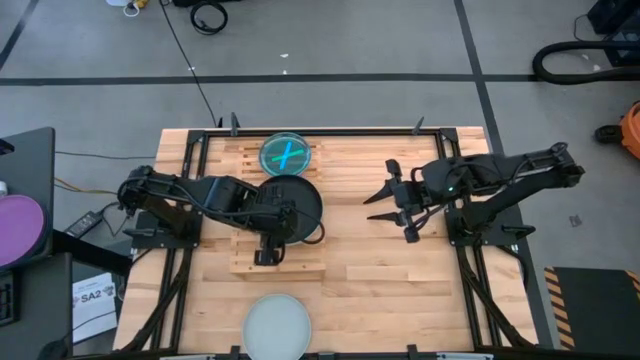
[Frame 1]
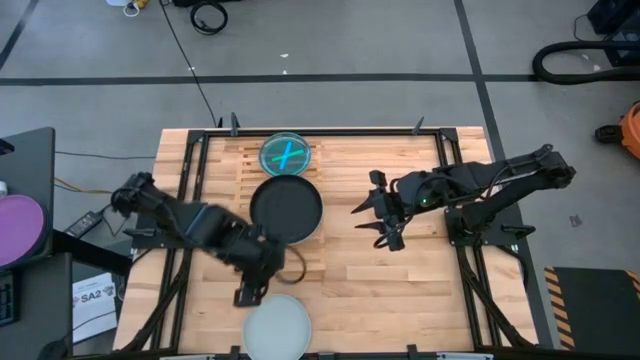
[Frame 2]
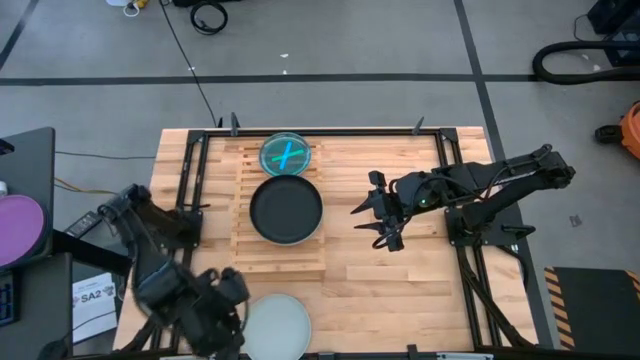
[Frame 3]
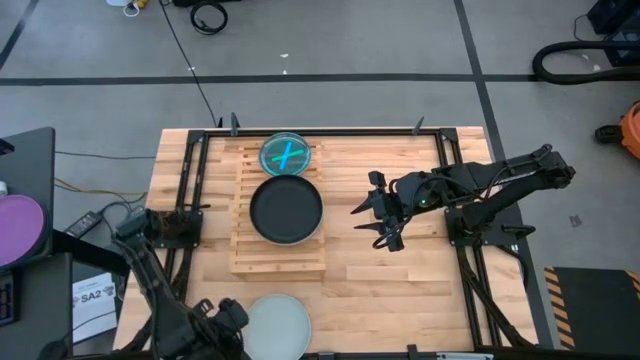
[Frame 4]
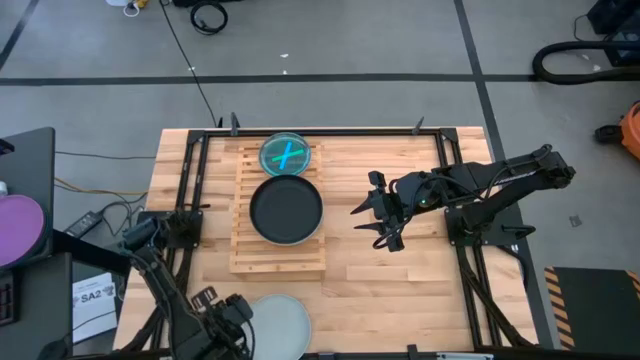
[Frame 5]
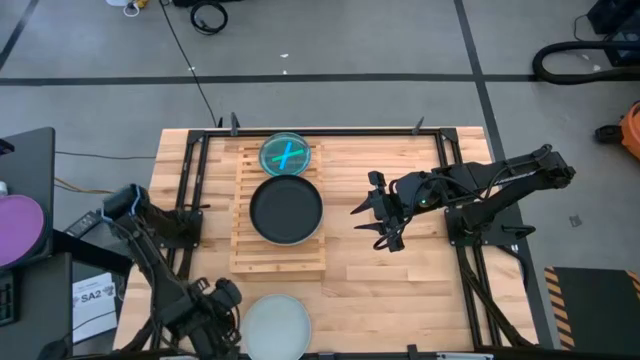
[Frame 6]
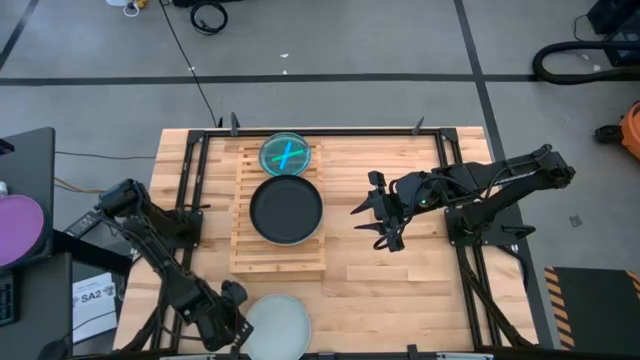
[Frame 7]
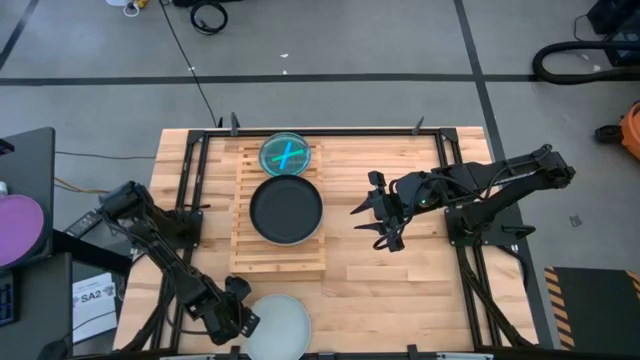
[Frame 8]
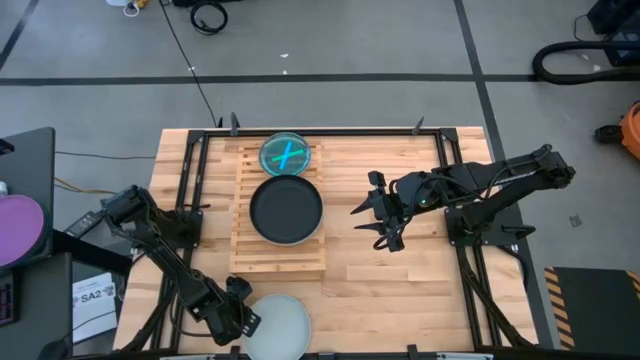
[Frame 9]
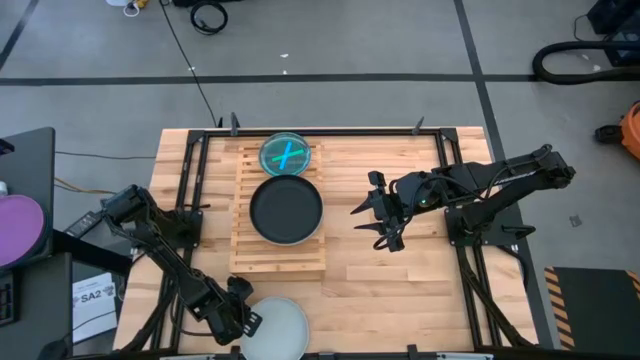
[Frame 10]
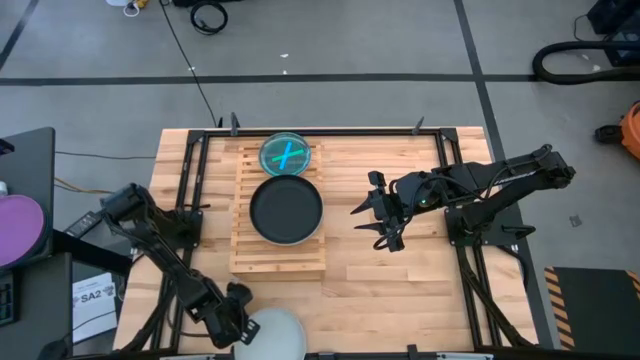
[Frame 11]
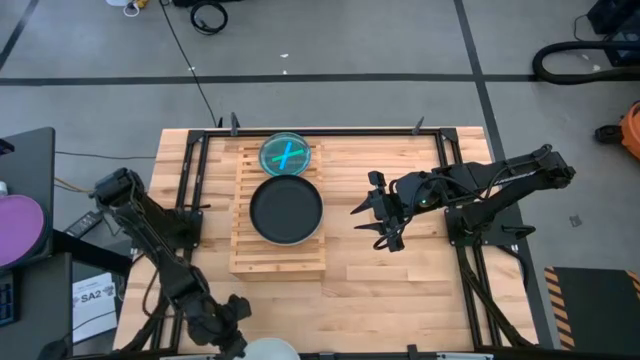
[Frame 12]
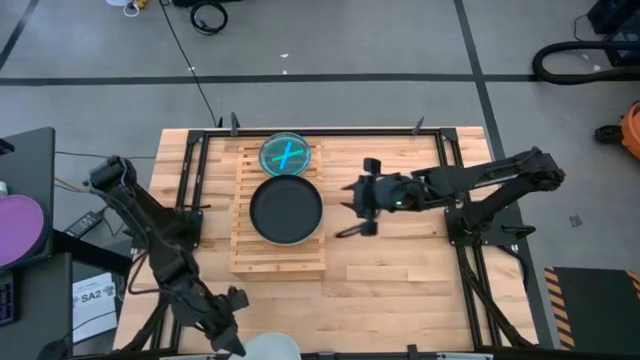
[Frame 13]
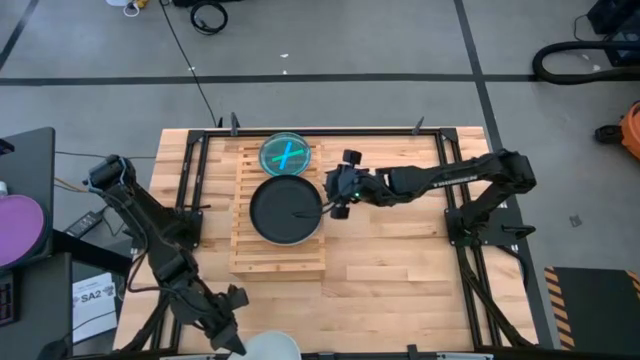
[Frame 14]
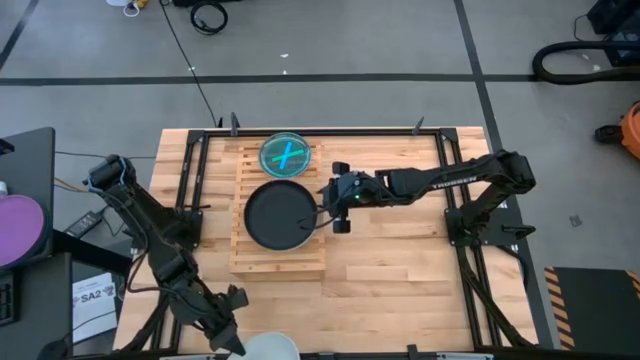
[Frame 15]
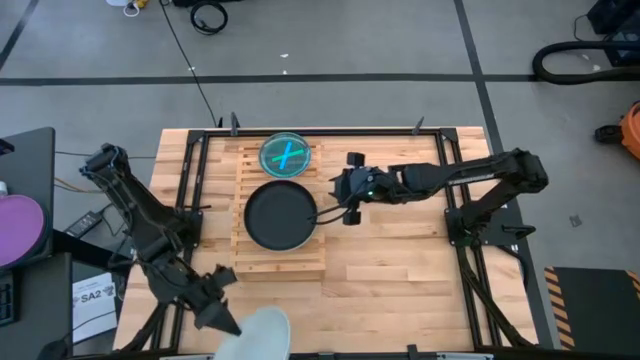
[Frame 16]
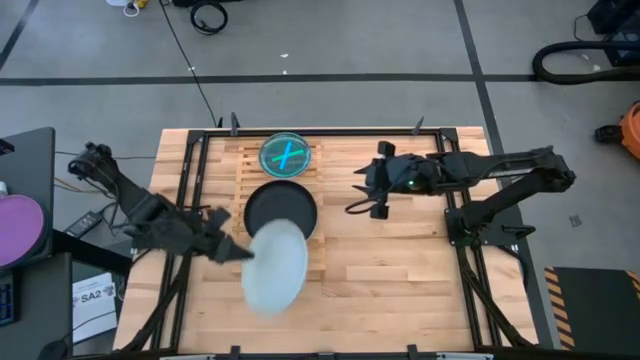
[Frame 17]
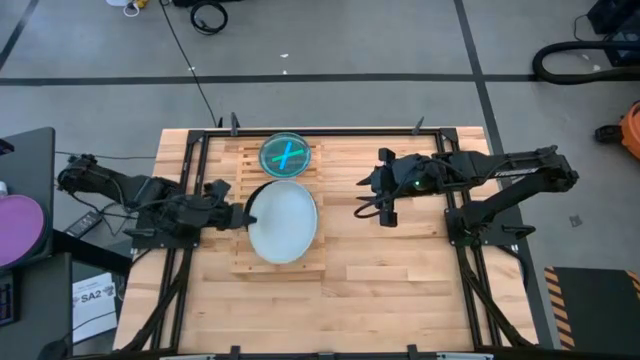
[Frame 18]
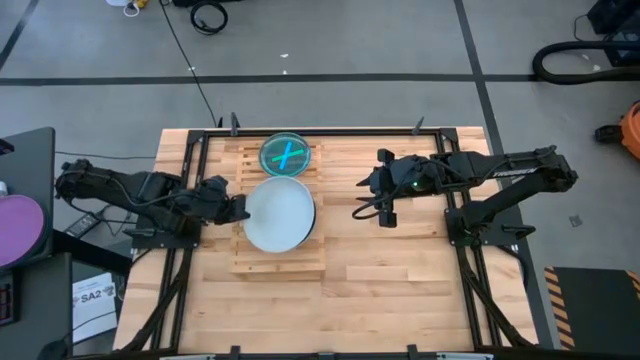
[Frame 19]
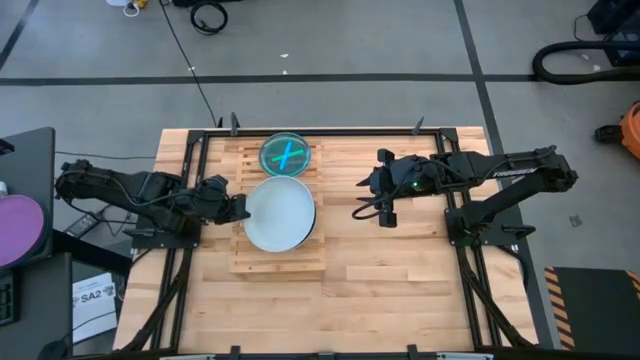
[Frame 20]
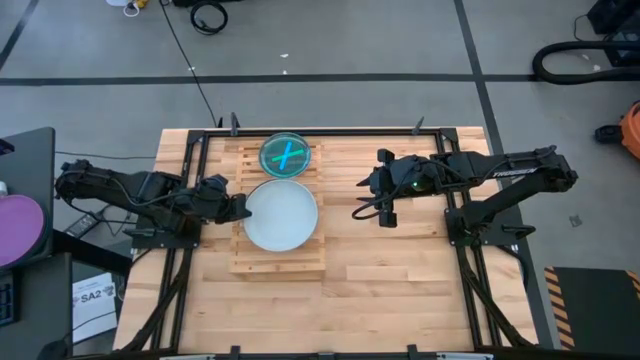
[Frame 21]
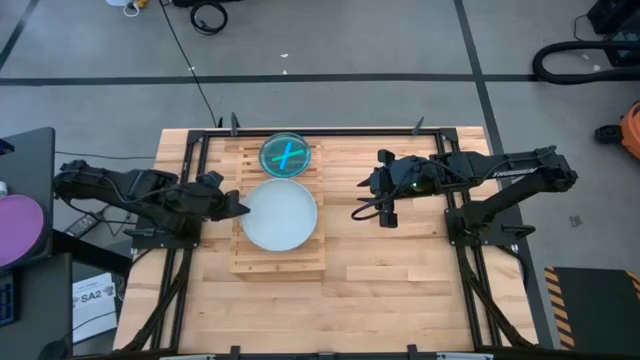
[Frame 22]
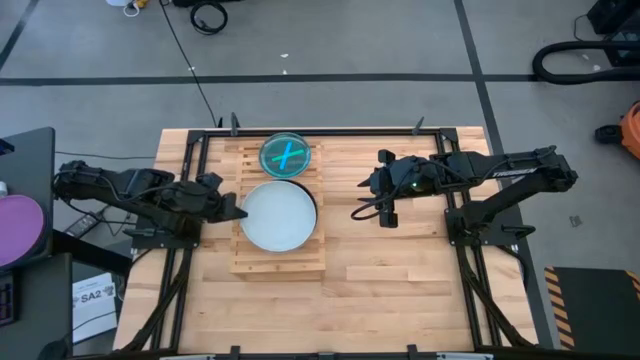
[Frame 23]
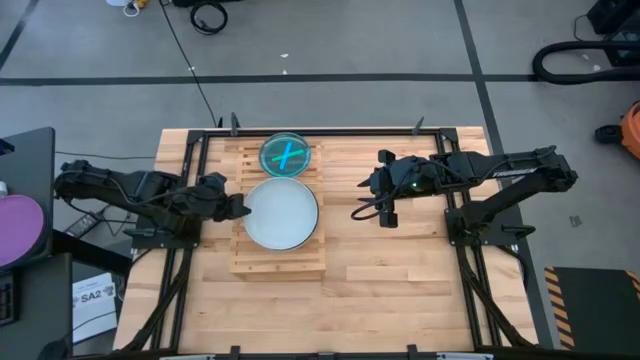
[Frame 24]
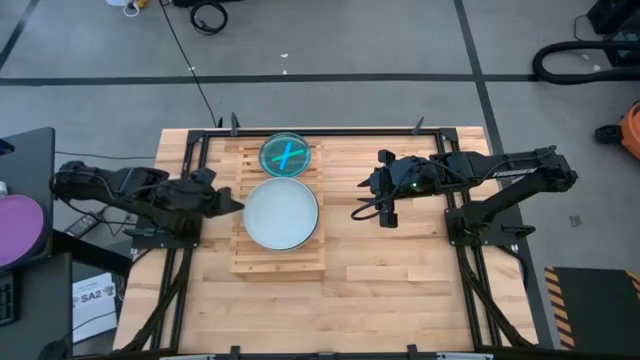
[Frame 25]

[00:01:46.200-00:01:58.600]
Task: Place and stack plates onto a shelf
Stack the gray plate on the black plate

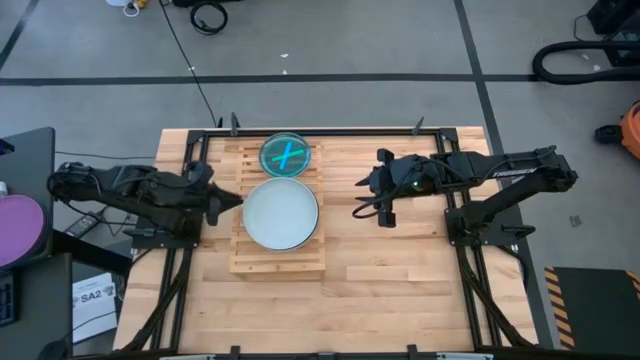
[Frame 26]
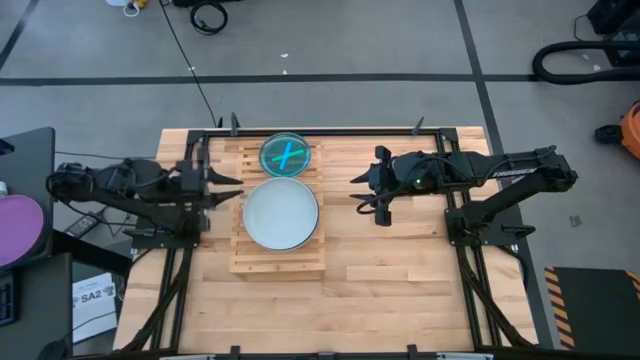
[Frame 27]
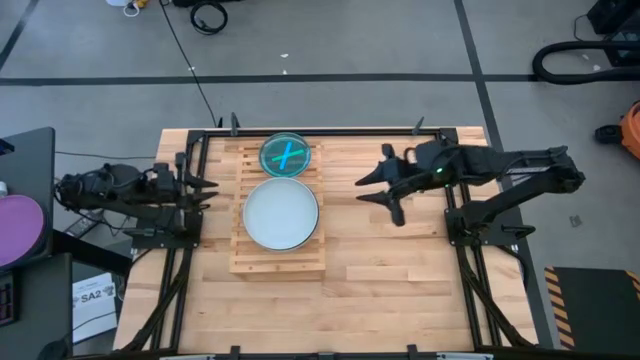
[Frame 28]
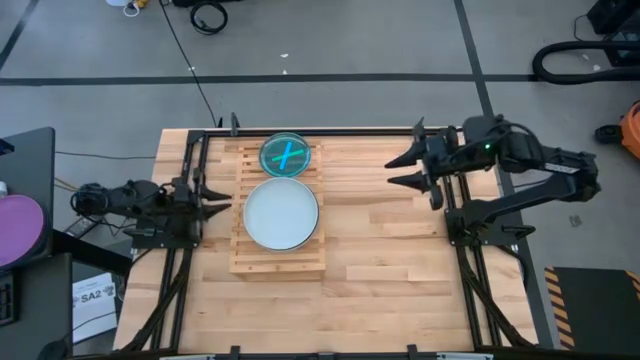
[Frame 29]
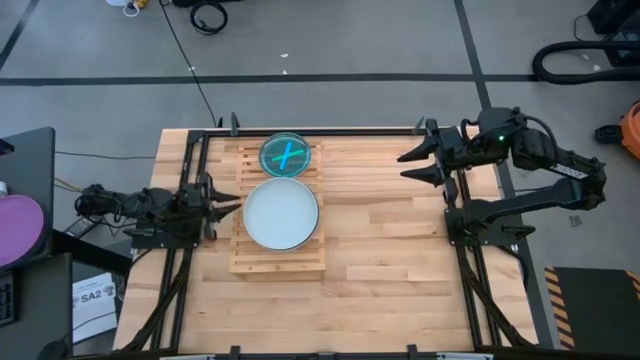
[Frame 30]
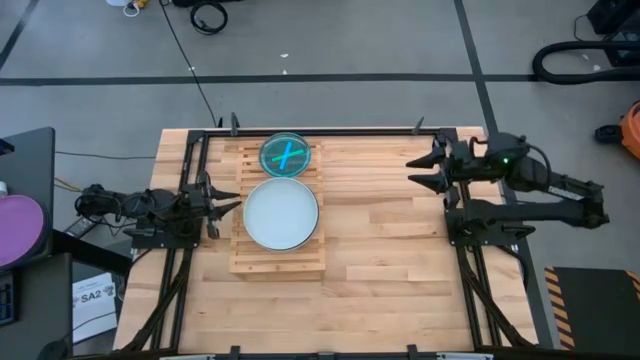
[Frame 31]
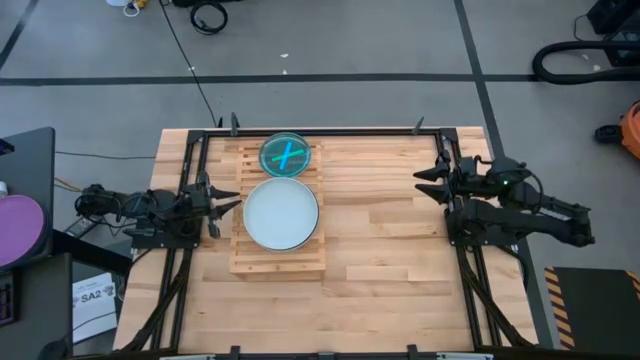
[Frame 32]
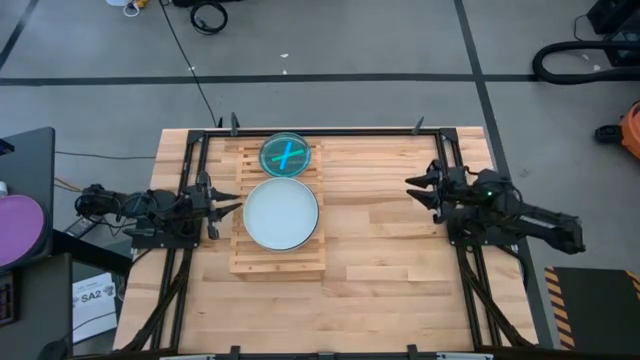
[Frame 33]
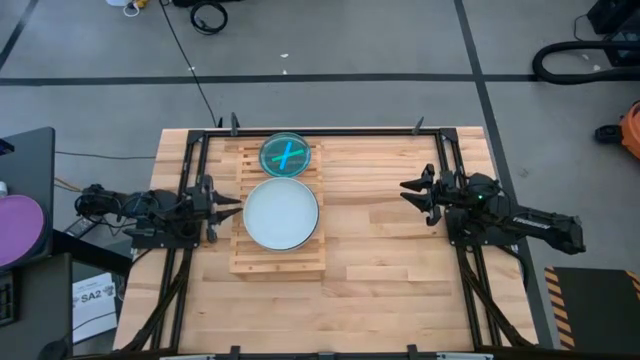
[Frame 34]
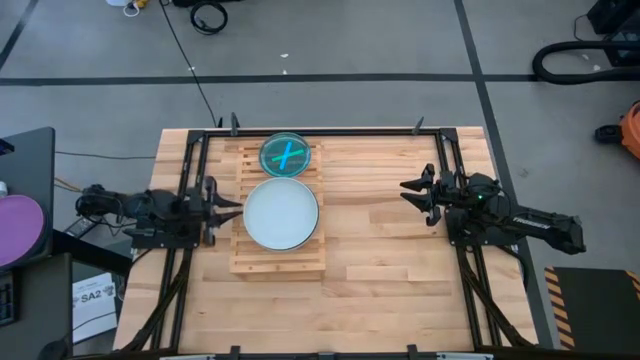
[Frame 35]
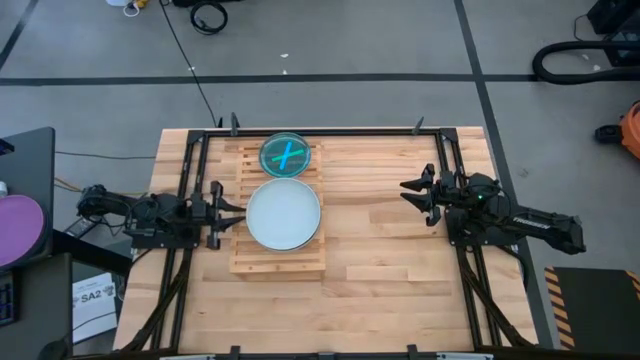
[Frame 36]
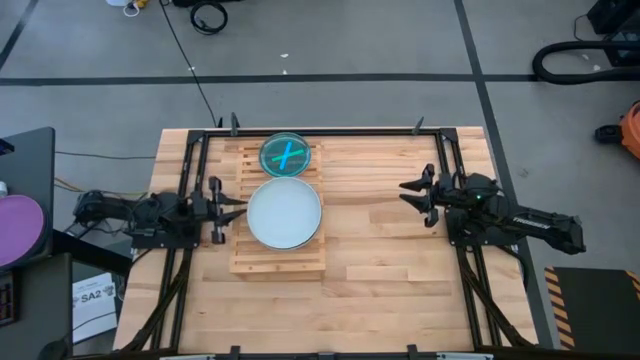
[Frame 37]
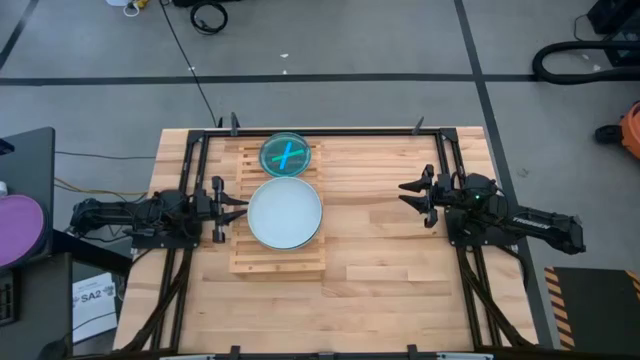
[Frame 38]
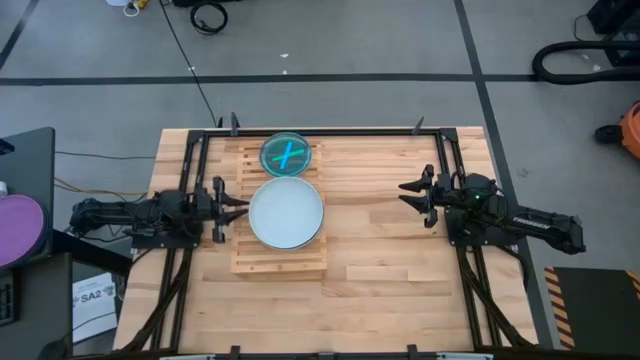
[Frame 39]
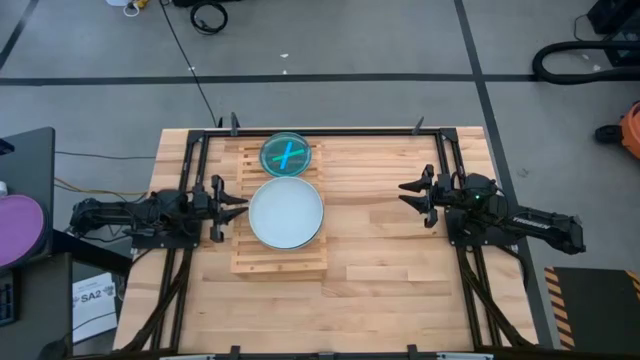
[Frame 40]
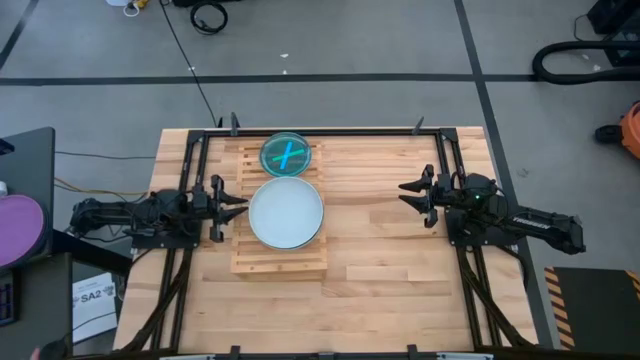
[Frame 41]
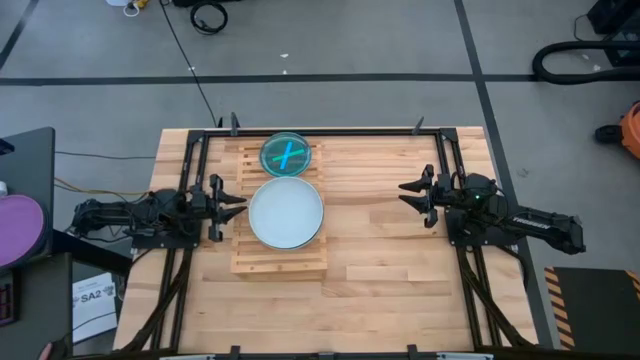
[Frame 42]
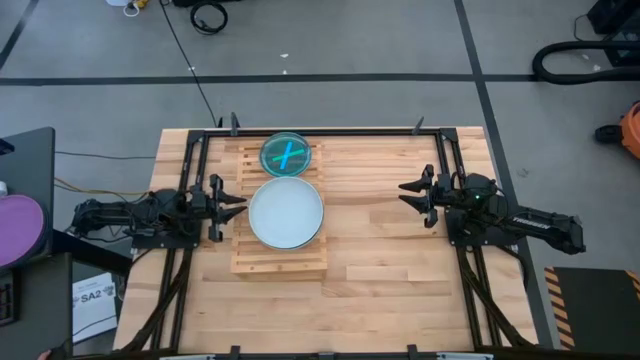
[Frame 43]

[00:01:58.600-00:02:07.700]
Return to Home Position
